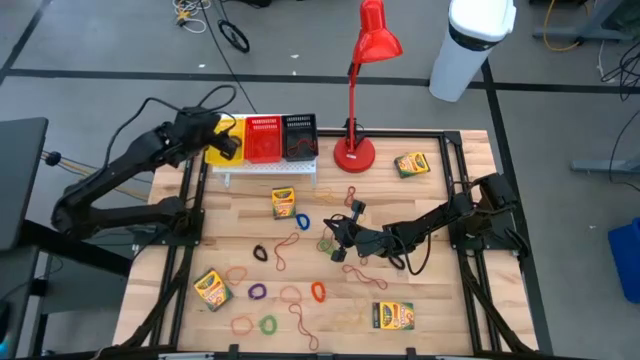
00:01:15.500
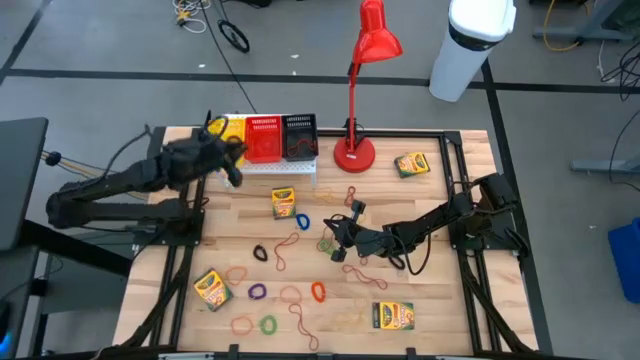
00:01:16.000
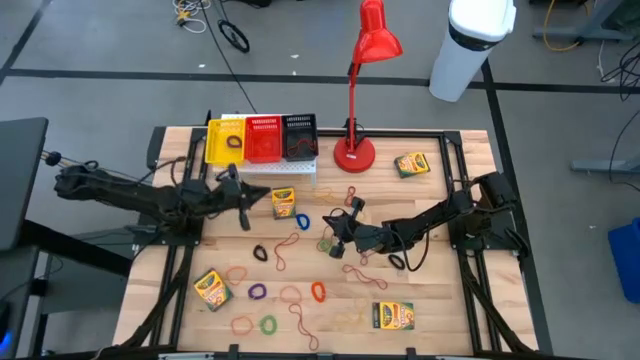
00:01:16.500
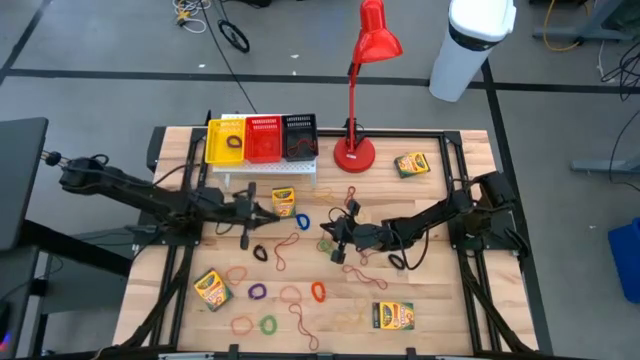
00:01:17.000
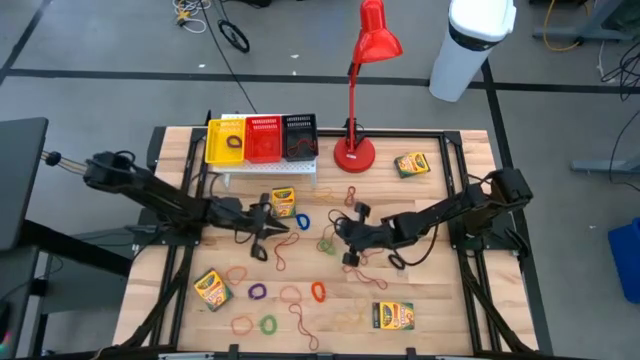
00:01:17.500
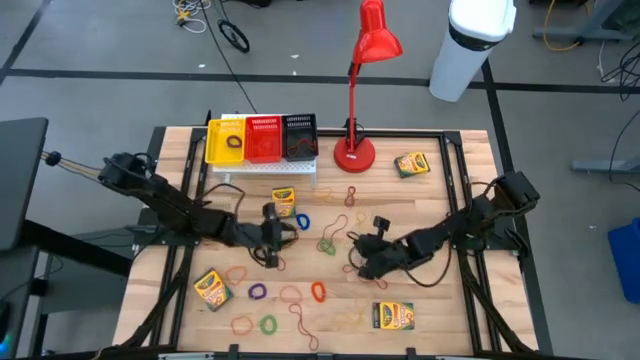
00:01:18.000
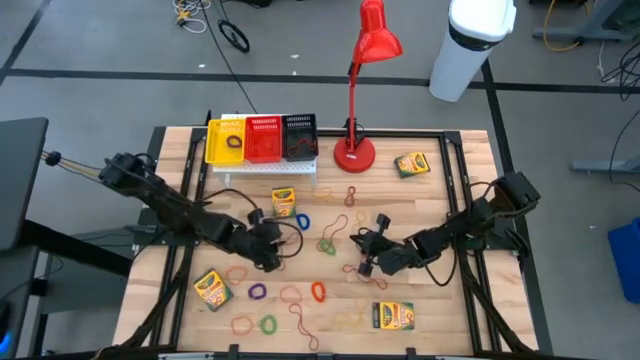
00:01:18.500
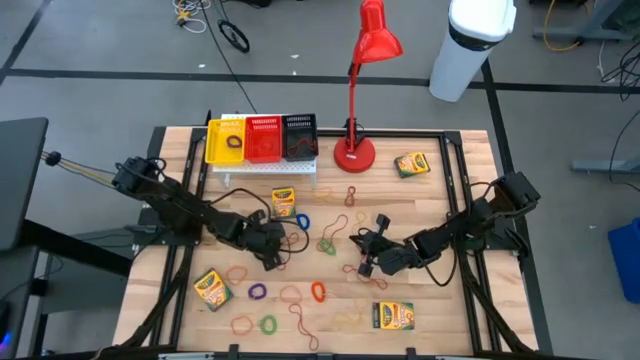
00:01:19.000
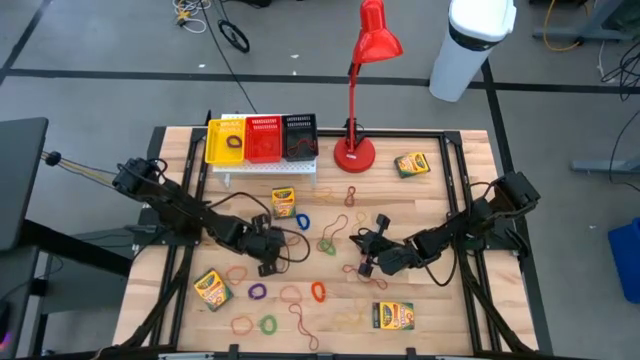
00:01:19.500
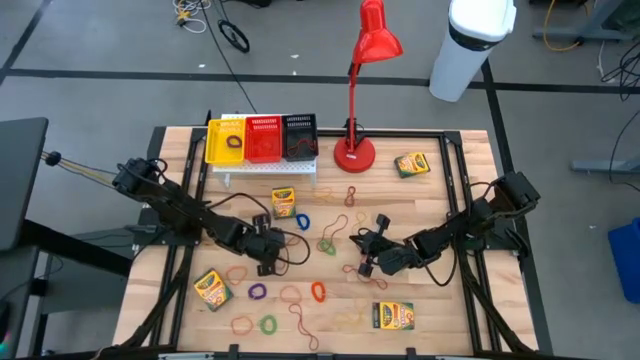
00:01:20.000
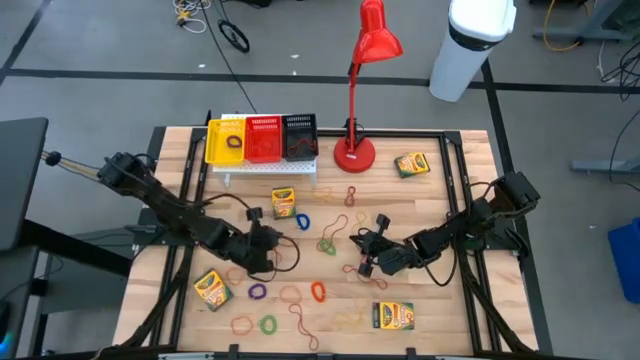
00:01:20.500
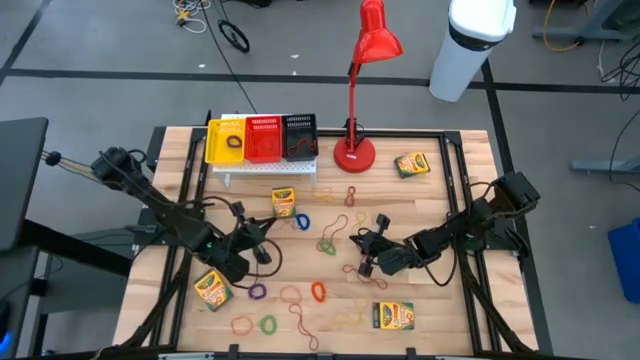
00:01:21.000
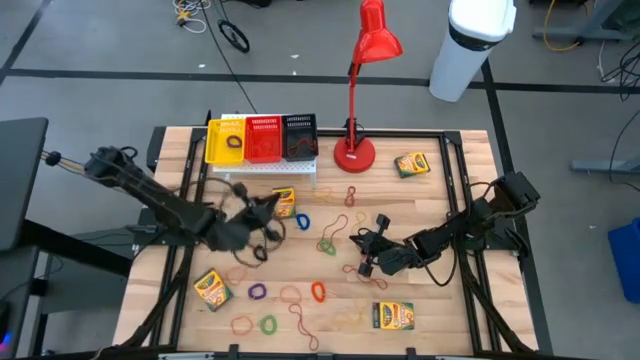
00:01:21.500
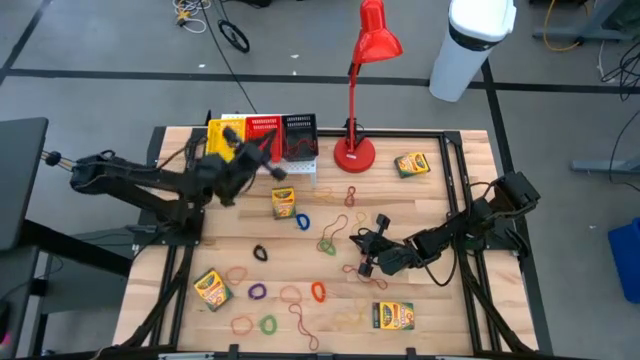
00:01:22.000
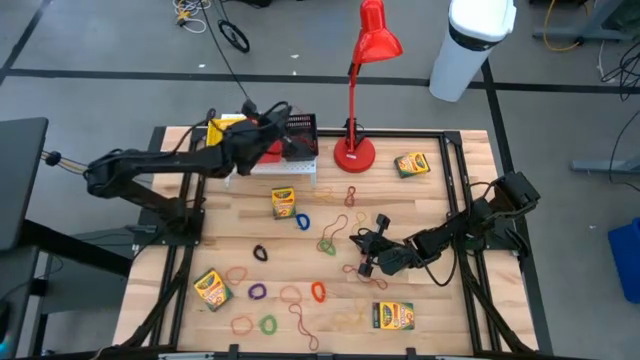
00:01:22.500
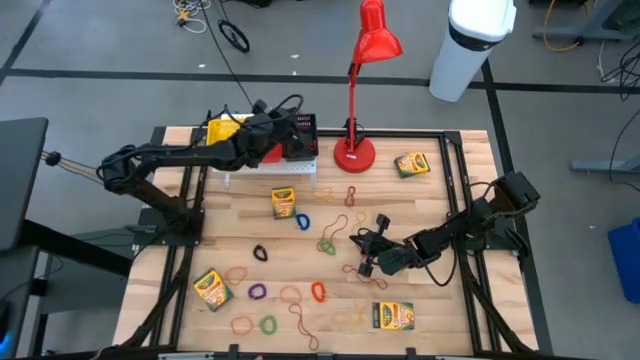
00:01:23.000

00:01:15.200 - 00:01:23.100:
Task: Pick & Place Office Desk Supplies
Put the red rubber band into the black bin on the shelf

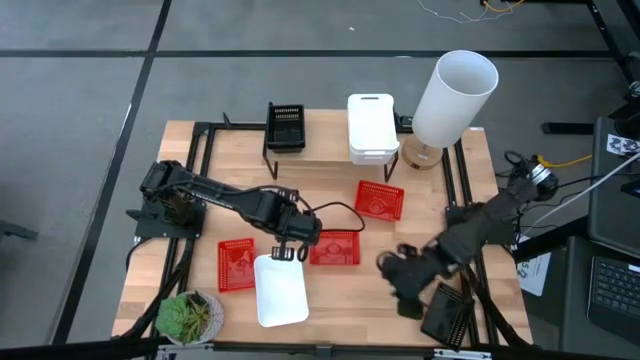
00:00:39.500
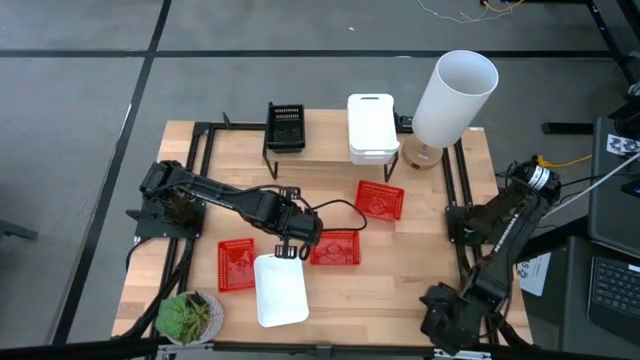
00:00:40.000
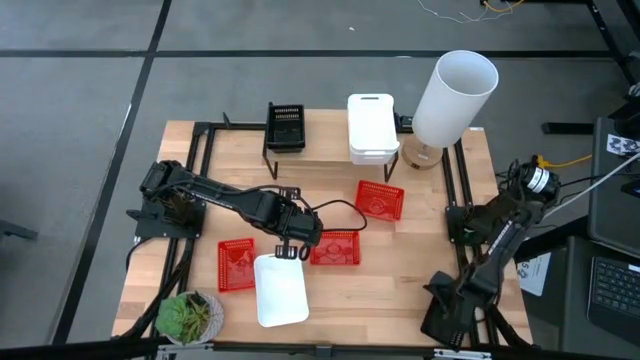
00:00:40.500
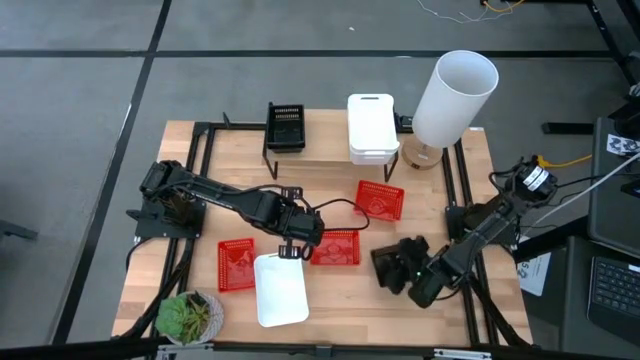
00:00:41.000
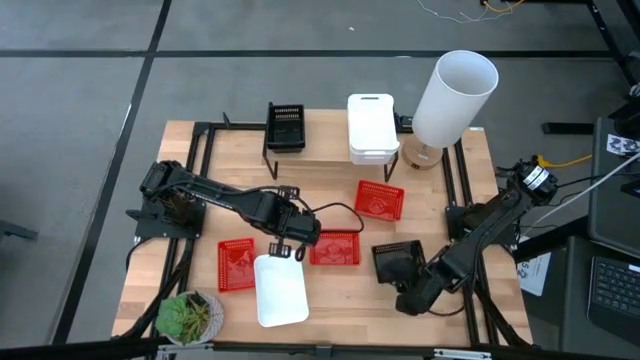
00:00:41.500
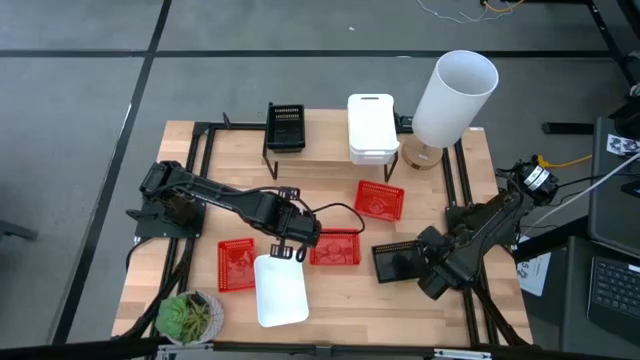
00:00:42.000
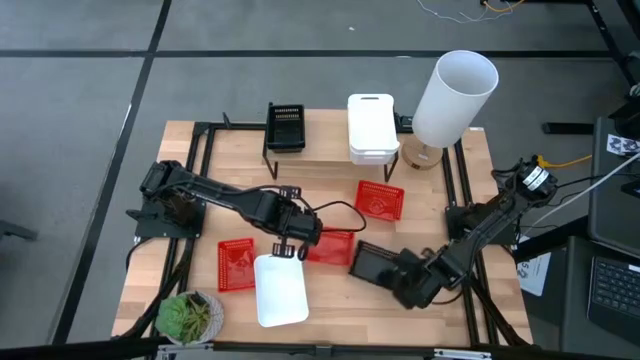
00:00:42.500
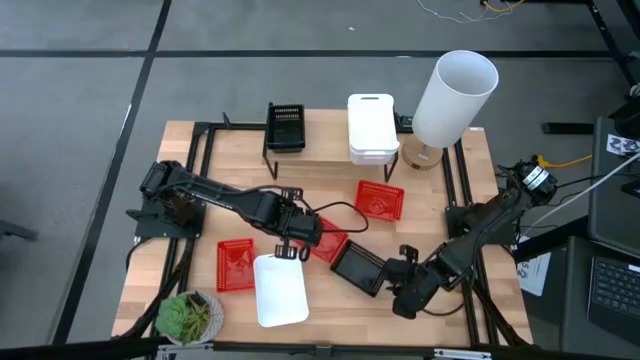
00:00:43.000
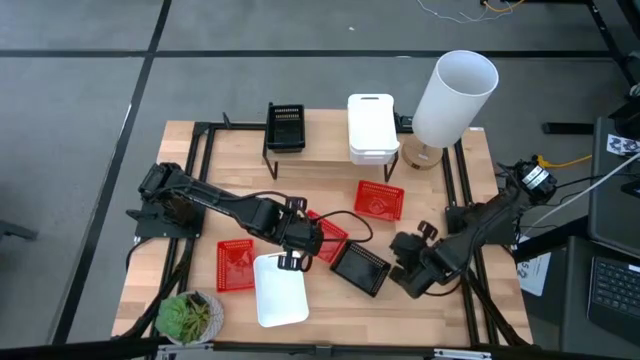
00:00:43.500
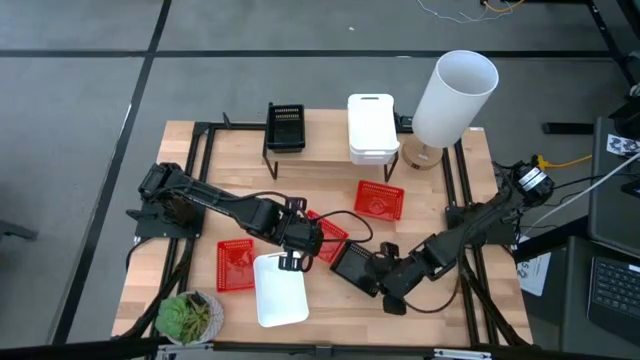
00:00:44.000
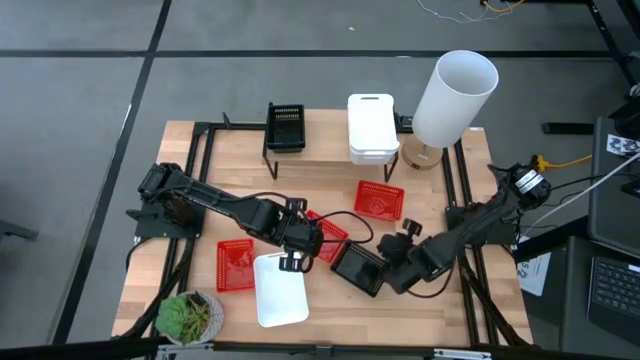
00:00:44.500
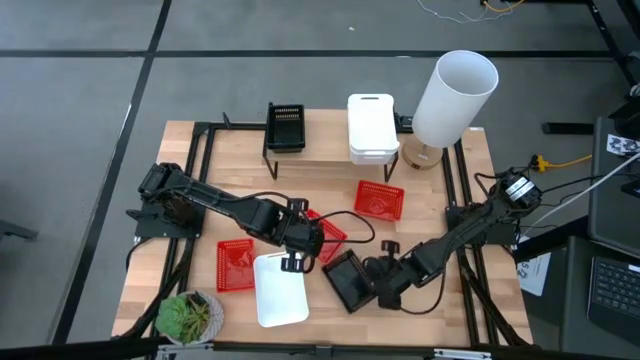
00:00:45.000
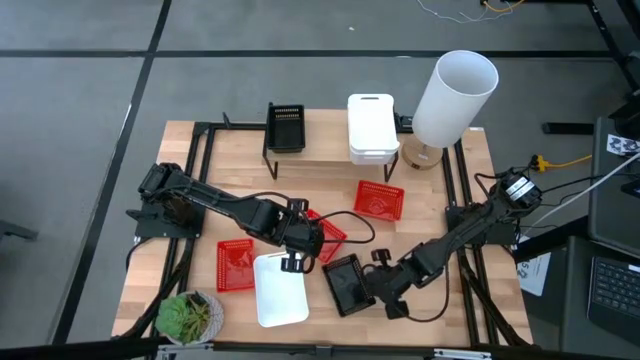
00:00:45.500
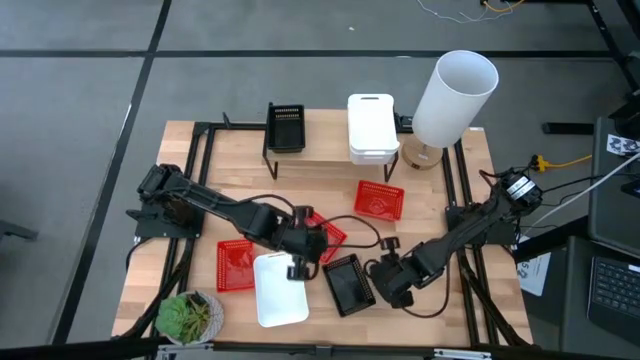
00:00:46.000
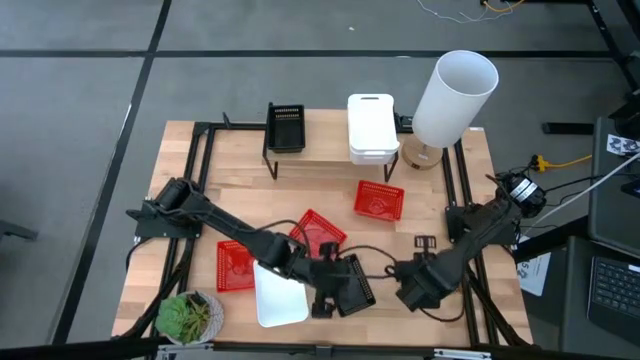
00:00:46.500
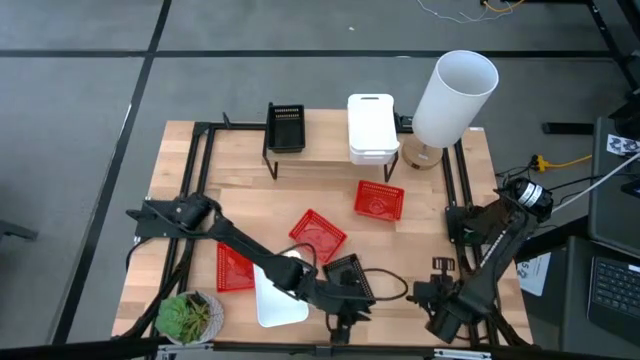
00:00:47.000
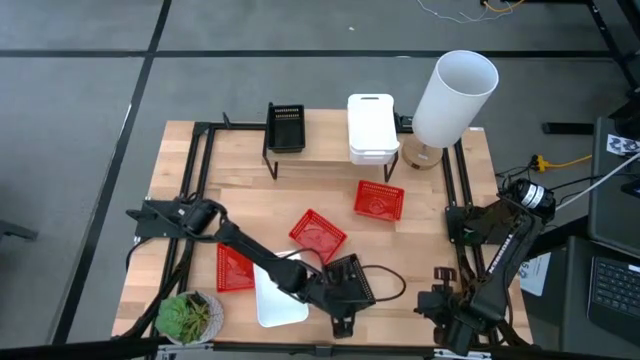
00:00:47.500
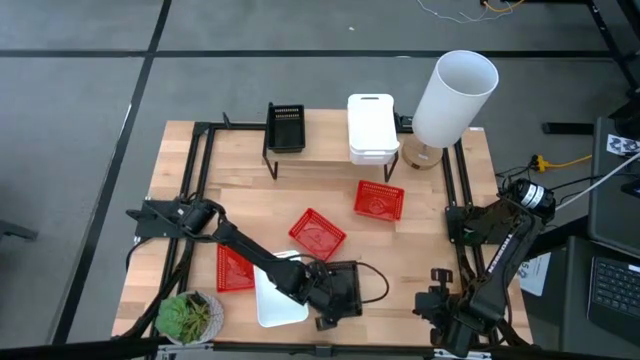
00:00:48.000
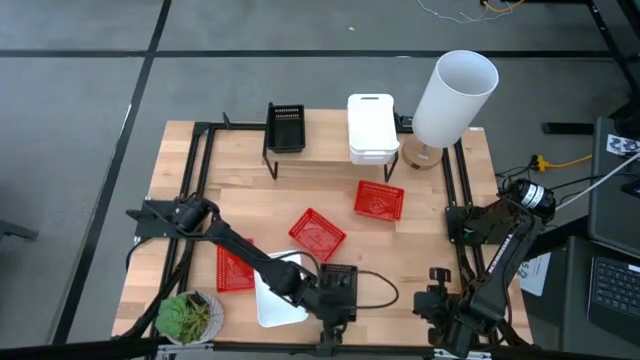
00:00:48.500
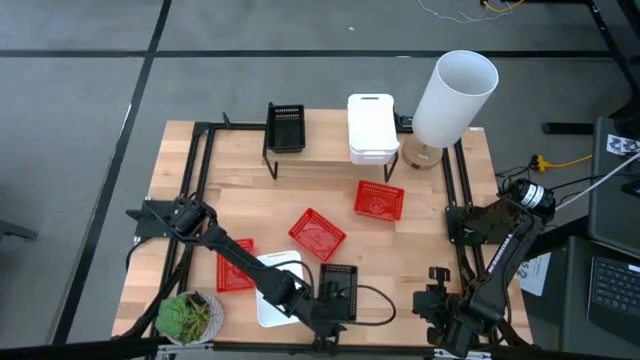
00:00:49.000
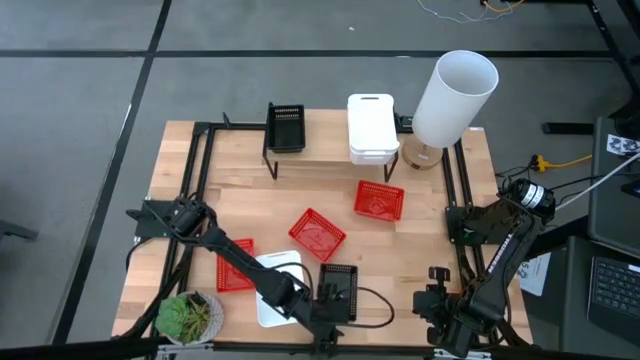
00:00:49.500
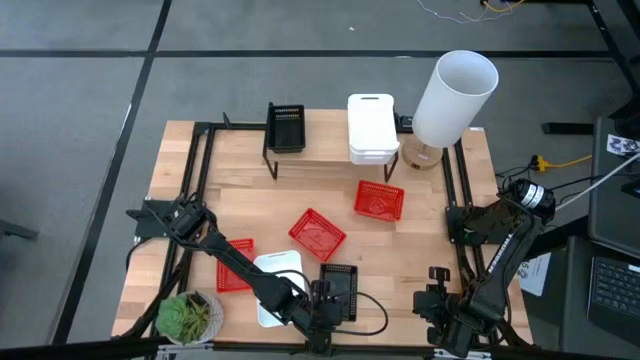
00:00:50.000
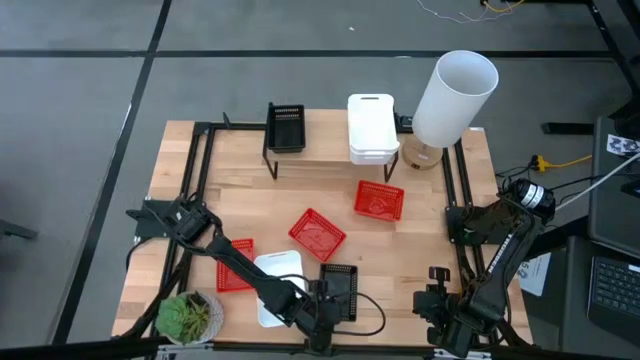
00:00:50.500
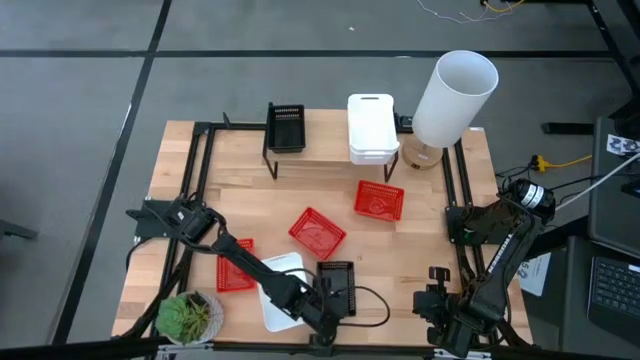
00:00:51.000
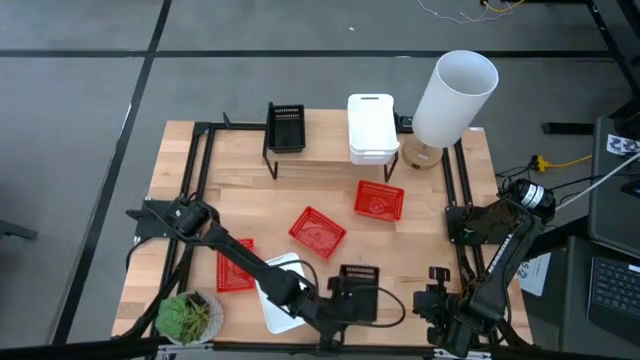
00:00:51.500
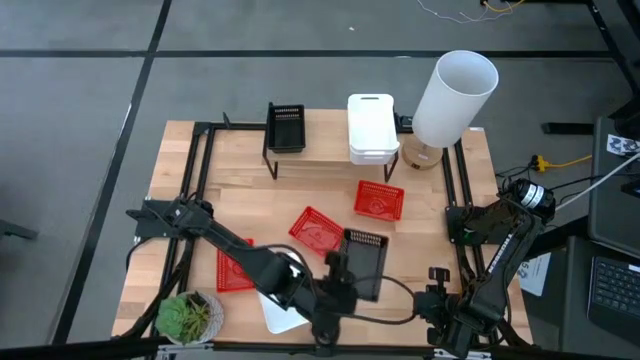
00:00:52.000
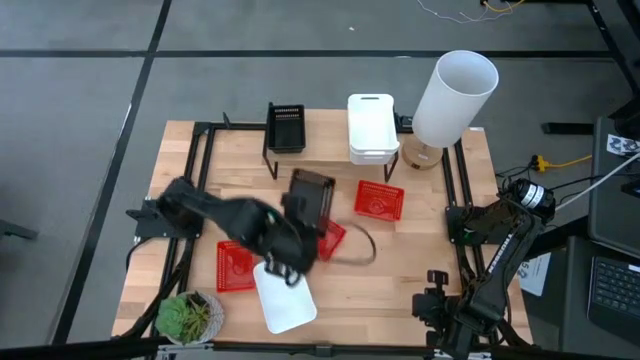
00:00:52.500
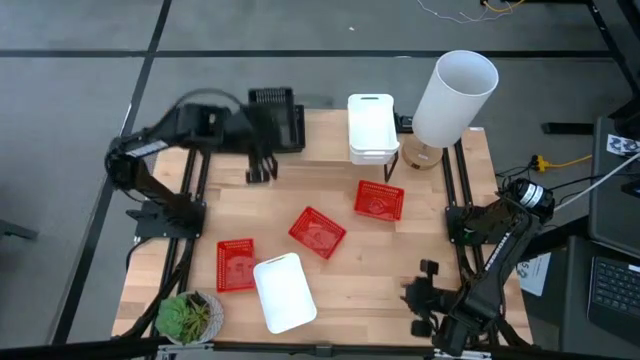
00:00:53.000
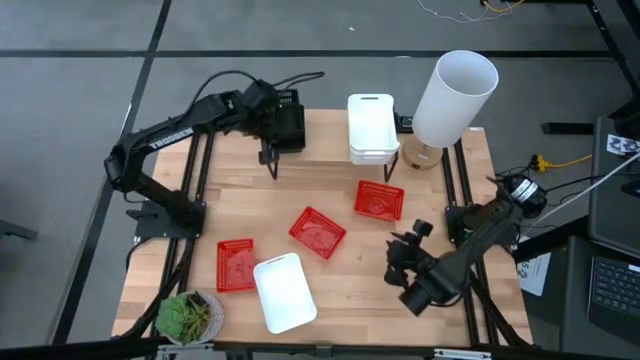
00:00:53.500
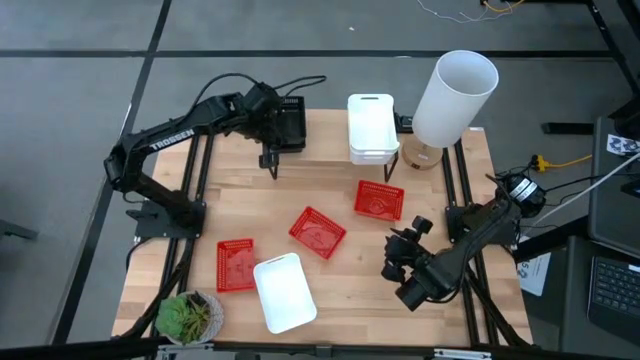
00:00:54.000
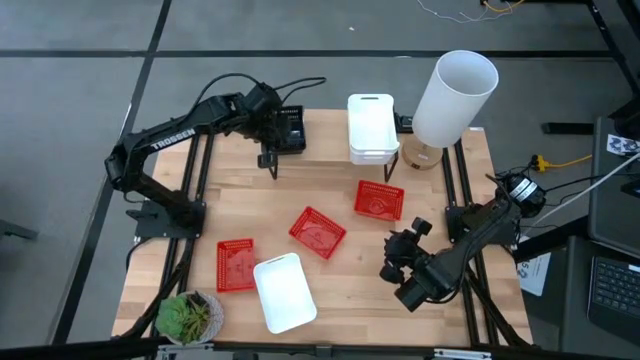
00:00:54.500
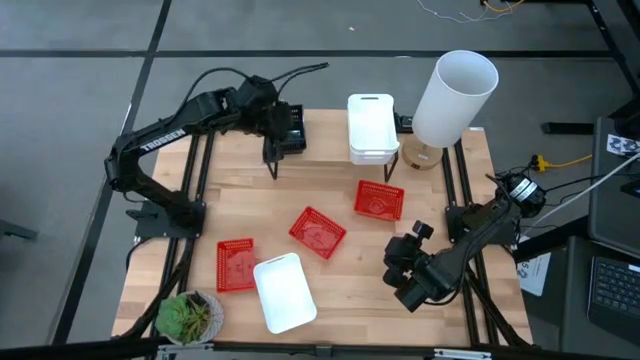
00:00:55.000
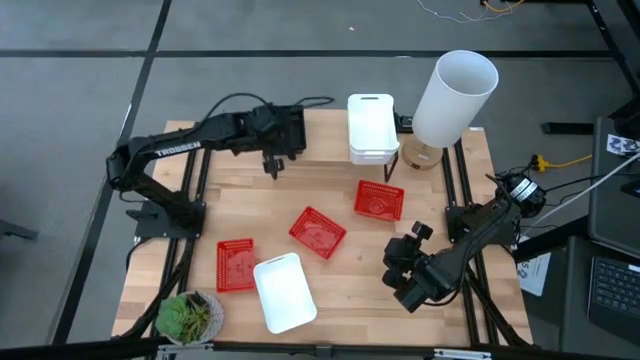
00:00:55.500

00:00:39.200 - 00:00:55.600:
Task: Stack baskets on shelf by color
Stack the black bin on top of the black bin on the shelf
